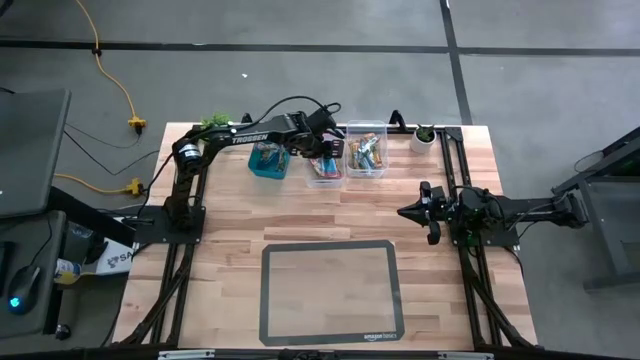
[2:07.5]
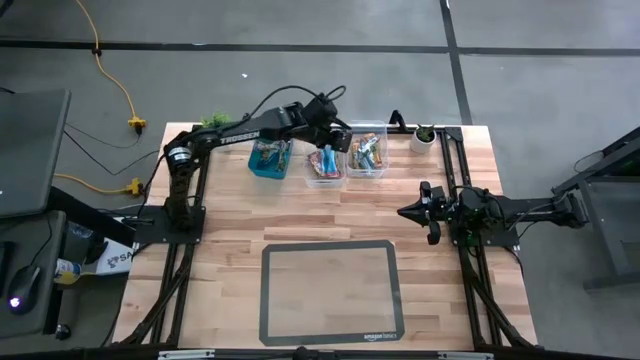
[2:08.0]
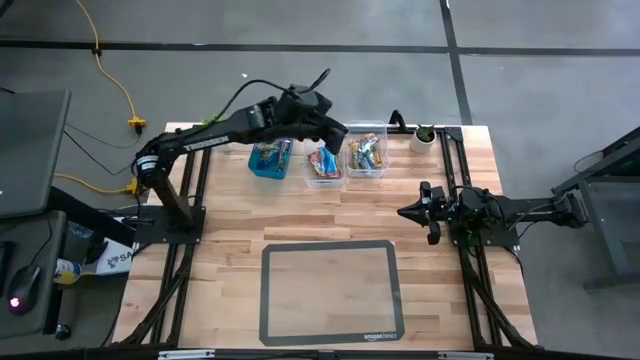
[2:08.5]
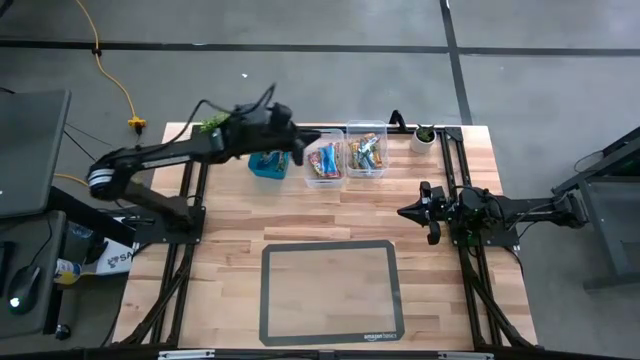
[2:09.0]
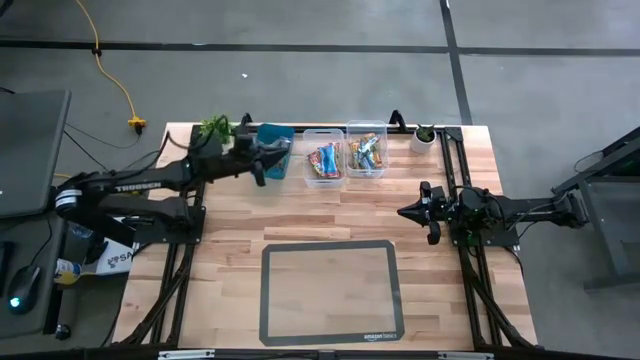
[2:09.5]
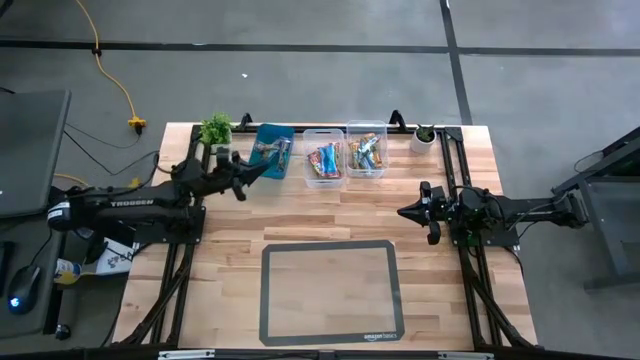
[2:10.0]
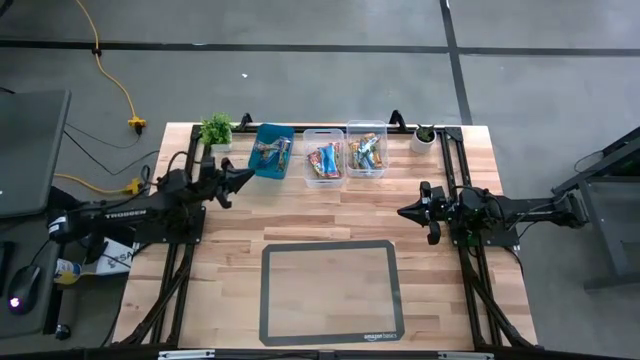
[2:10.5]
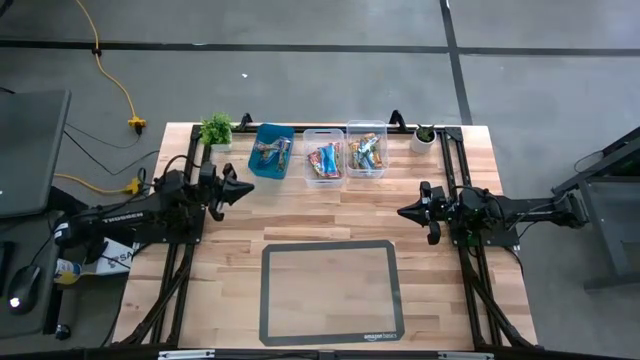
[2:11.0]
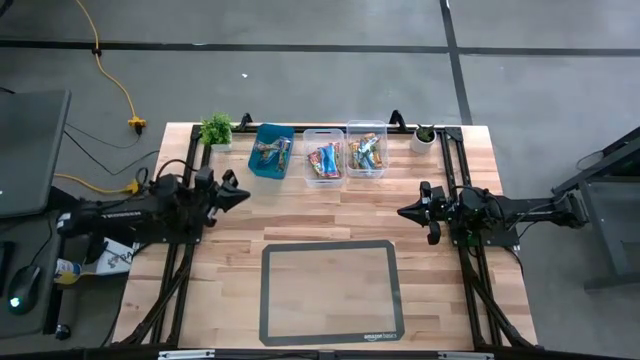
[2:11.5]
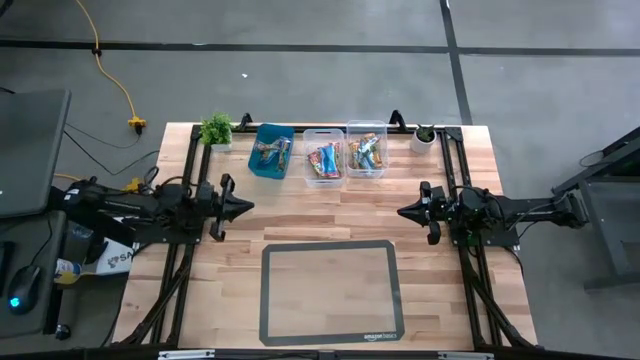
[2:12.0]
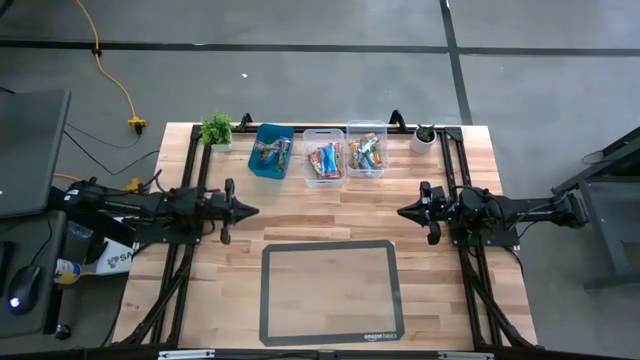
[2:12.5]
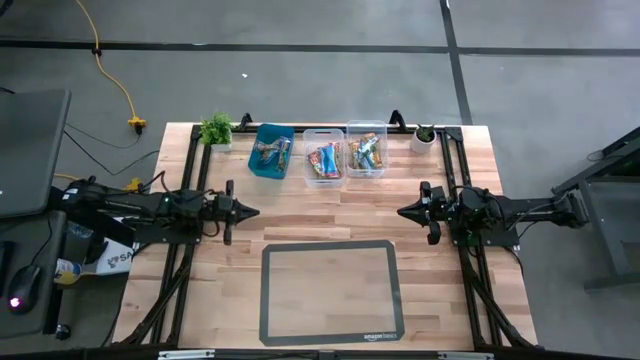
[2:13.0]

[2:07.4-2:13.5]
Task: Pick and place Granola Bars by type
Return to Home Position

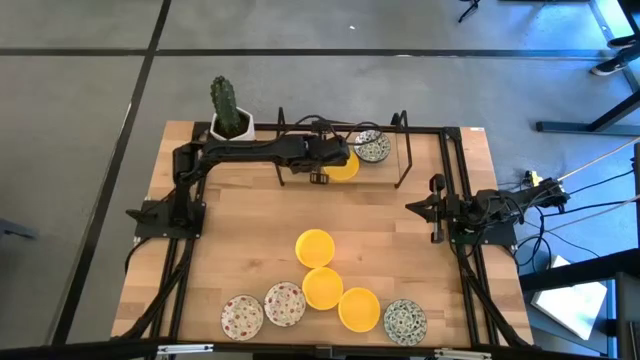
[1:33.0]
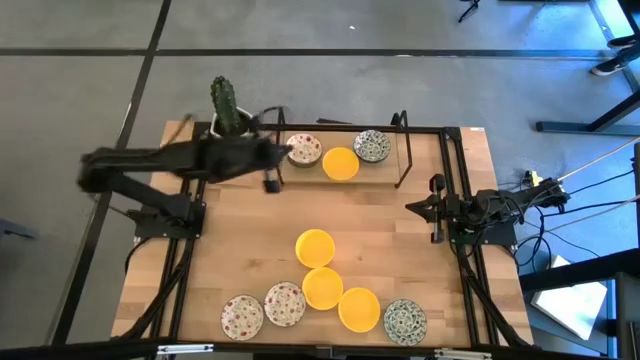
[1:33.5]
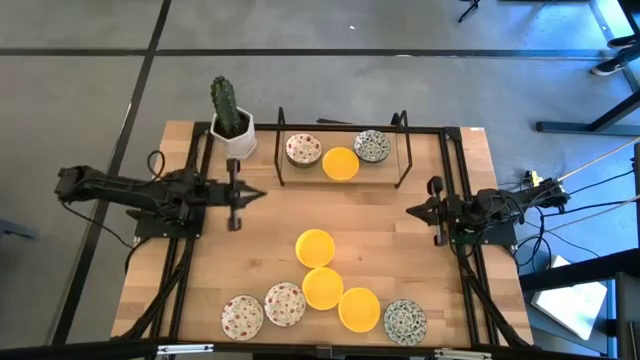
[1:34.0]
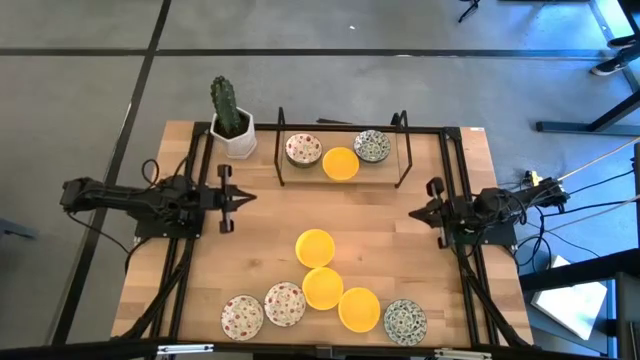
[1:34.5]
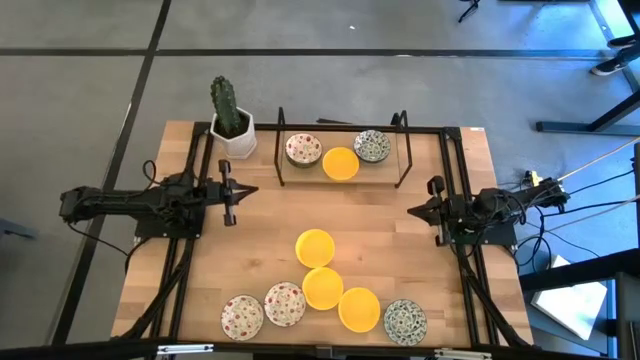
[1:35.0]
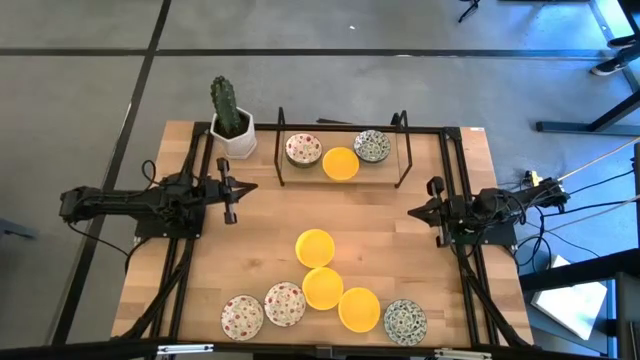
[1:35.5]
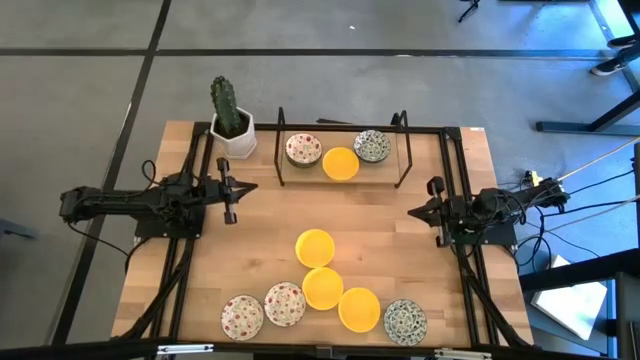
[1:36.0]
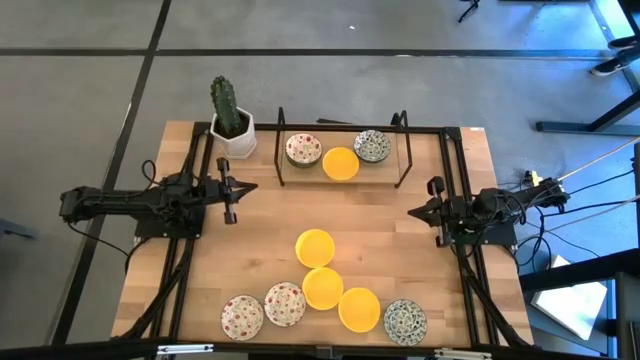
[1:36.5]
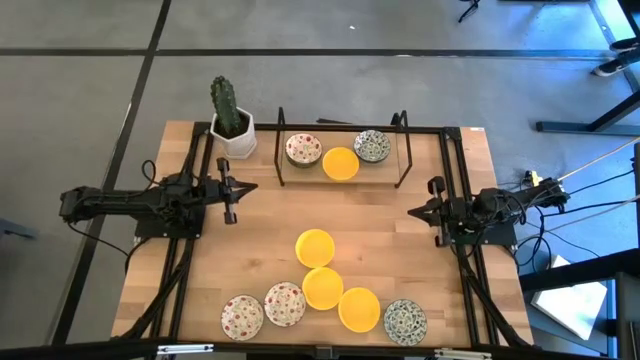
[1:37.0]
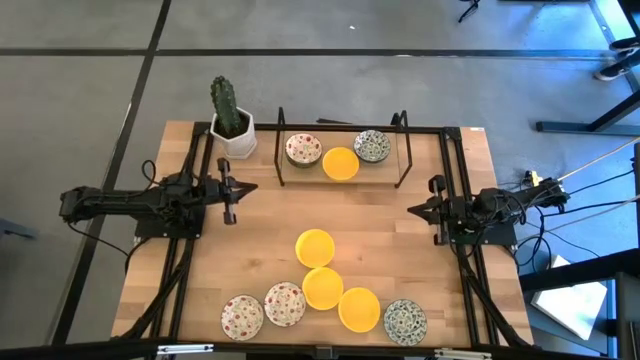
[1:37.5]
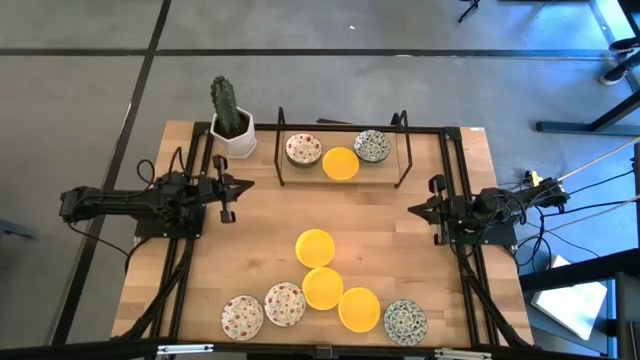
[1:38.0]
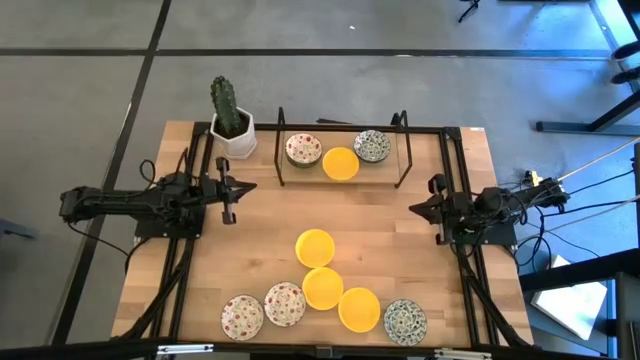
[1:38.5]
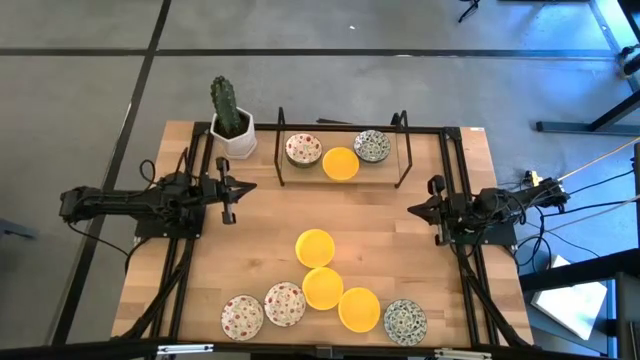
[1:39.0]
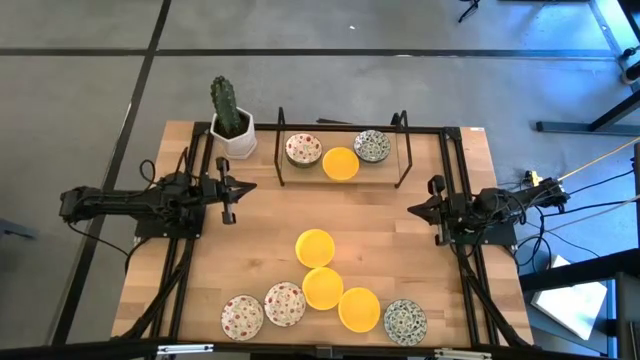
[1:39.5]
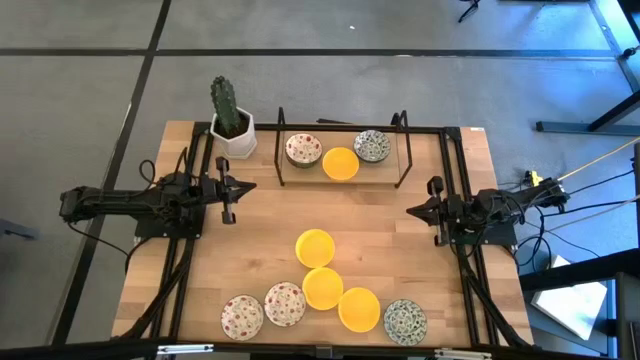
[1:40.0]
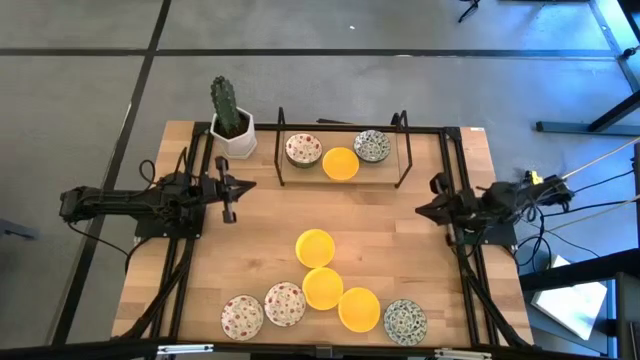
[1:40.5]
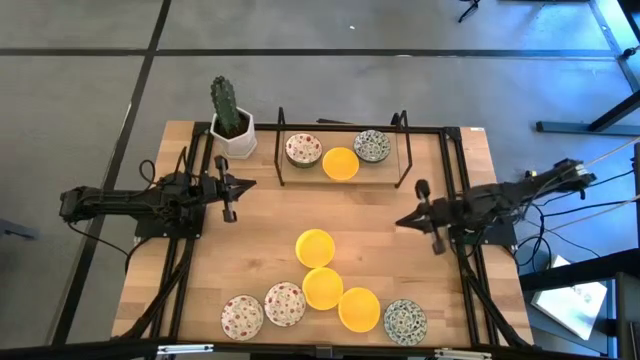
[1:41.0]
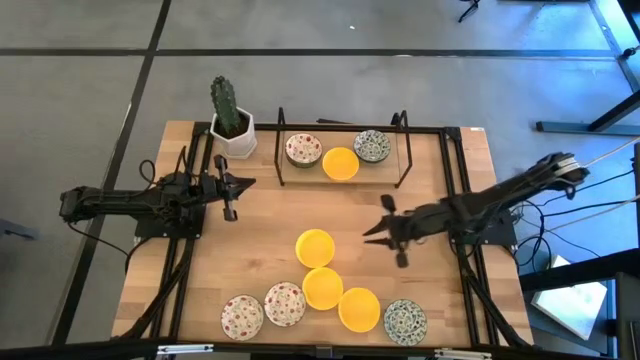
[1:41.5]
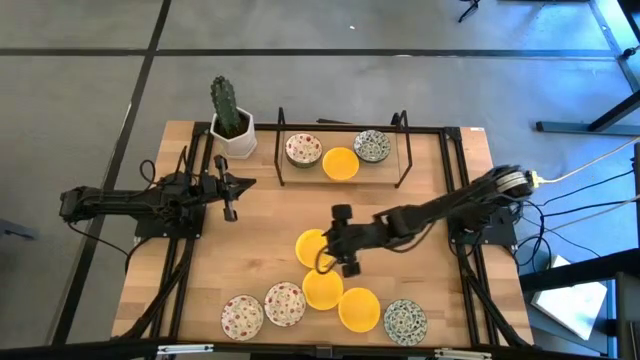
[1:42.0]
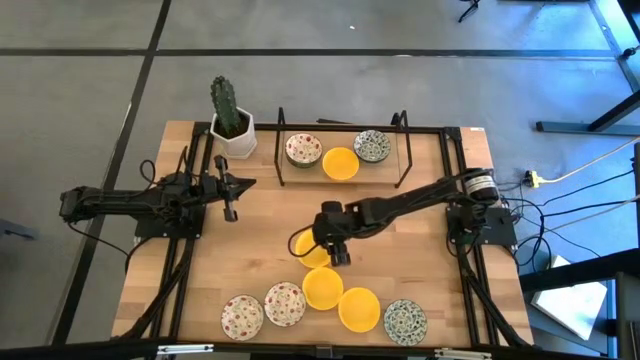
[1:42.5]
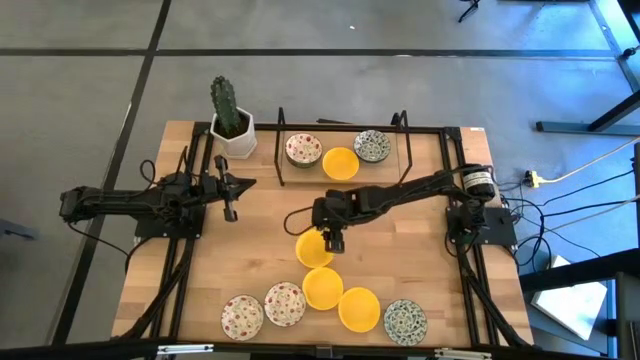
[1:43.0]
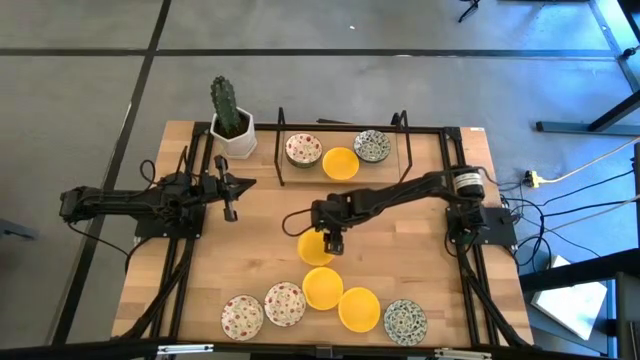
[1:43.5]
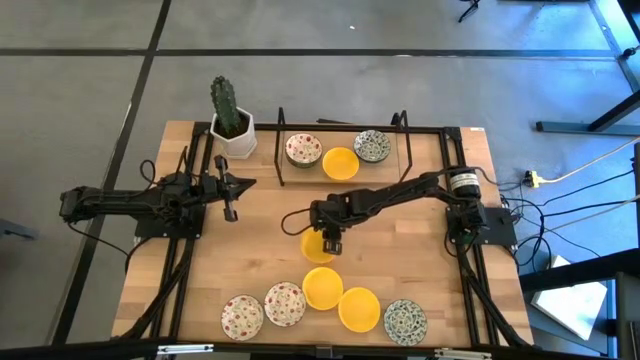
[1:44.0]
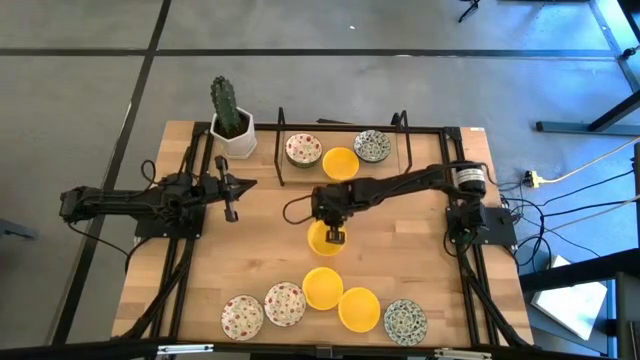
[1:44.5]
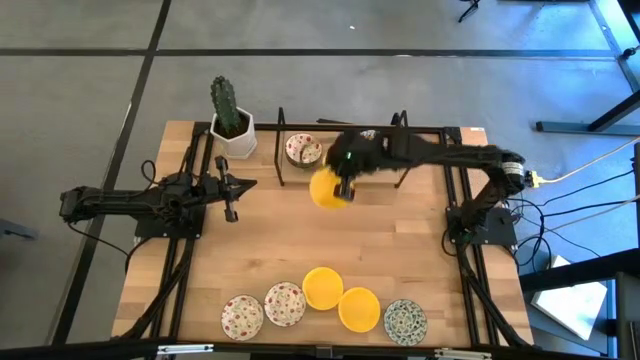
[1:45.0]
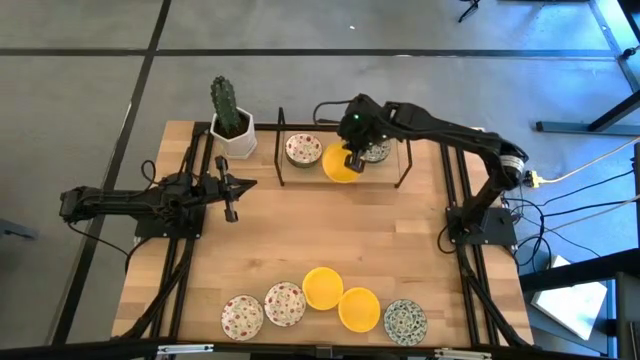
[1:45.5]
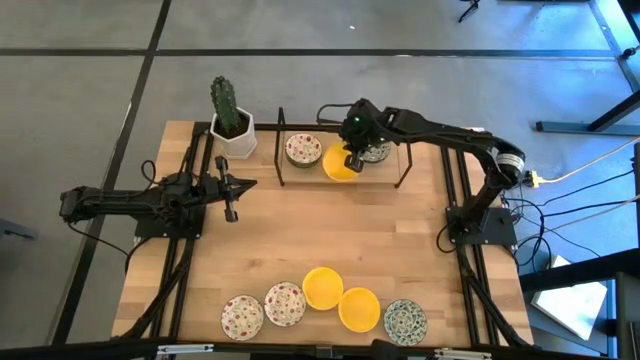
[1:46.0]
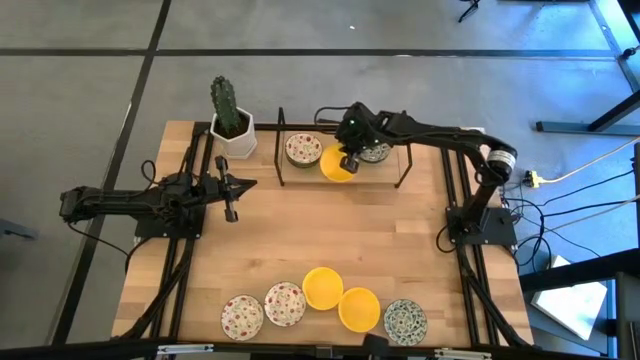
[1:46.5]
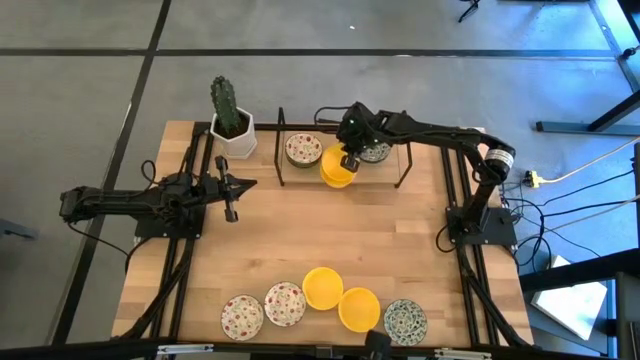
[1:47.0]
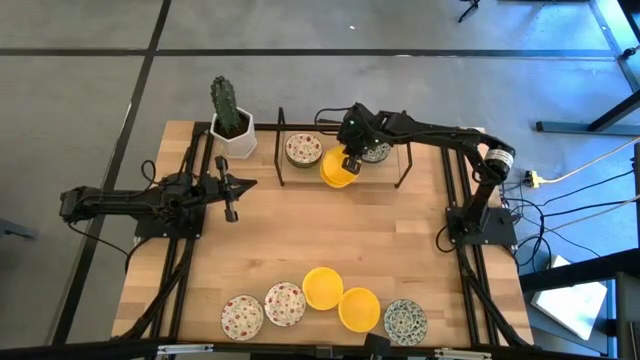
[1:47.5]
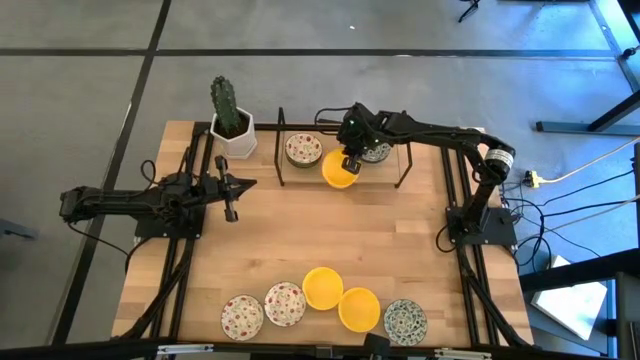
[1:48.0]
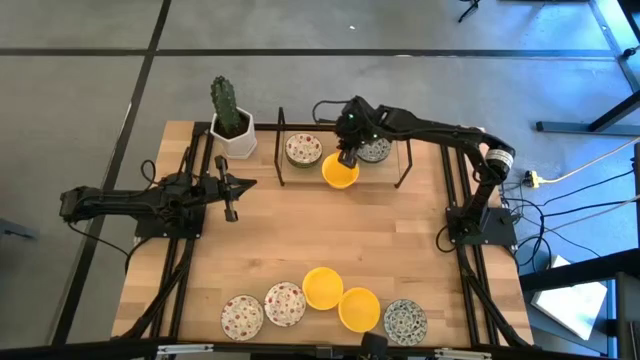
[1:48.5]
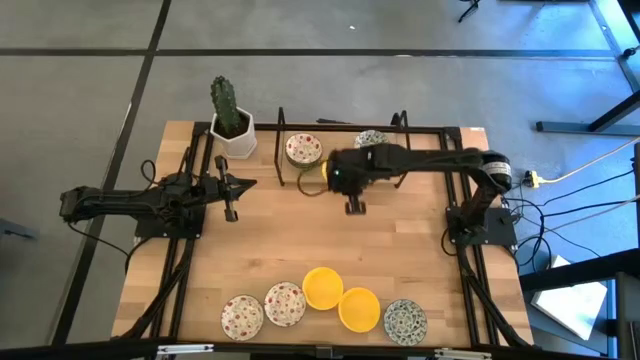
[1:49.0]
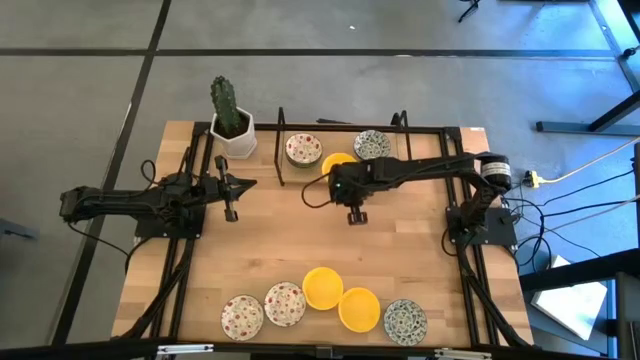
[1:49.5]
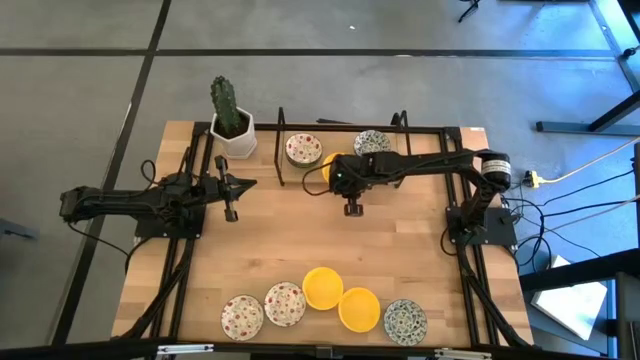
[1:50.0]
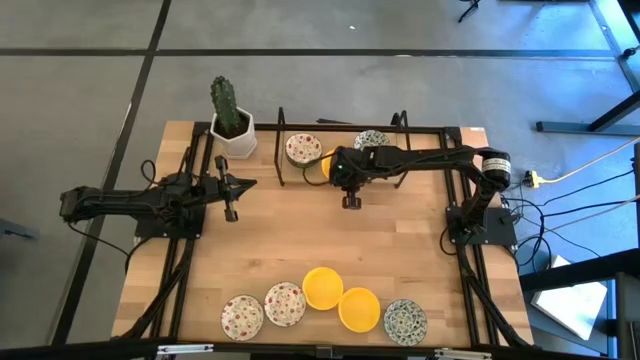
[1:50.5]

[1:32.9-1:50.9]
Task: Pick & Place Mini bowls
Stack the yellow bowl on the top of the yellow bowl on the shelf
